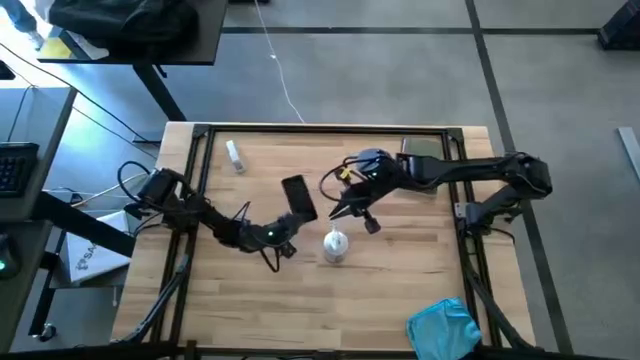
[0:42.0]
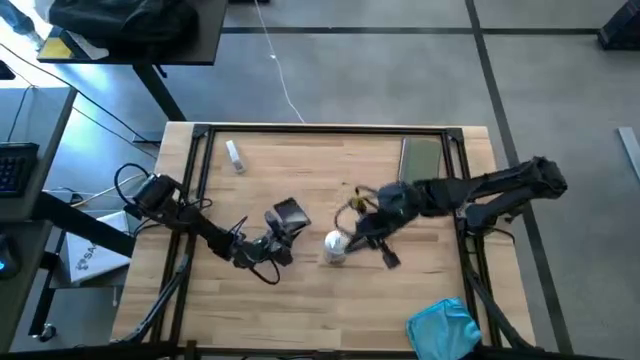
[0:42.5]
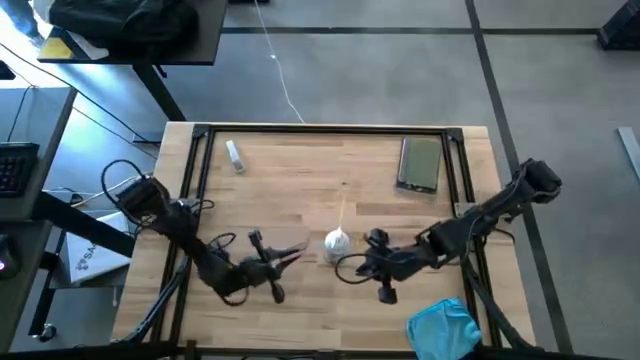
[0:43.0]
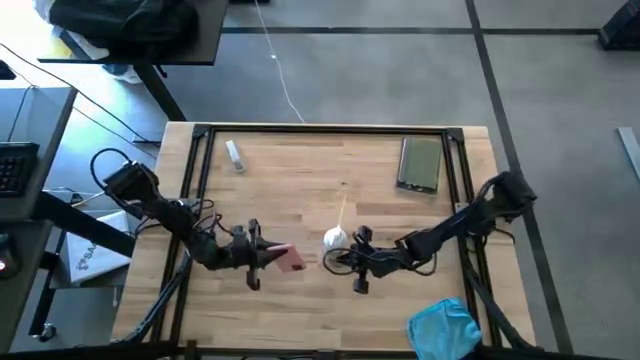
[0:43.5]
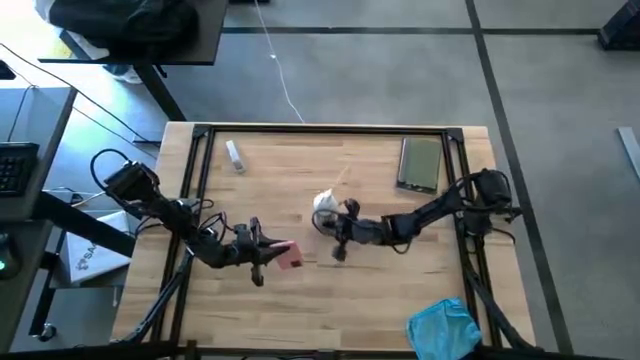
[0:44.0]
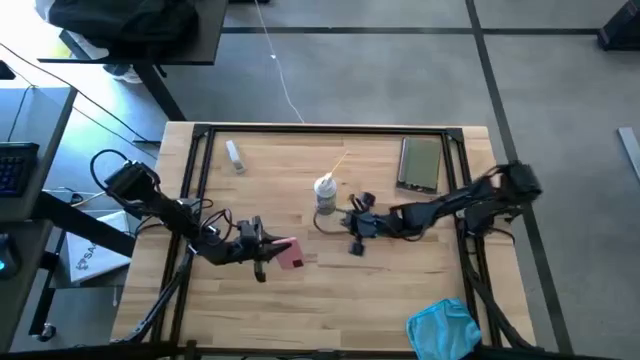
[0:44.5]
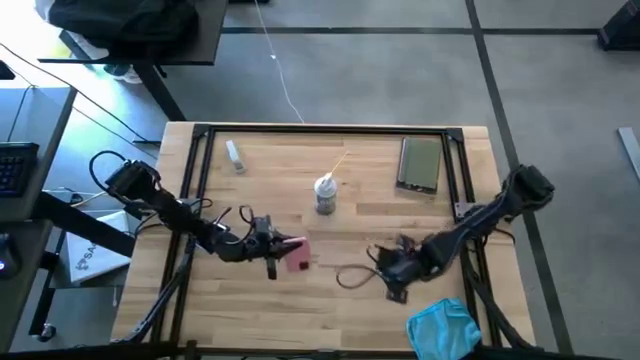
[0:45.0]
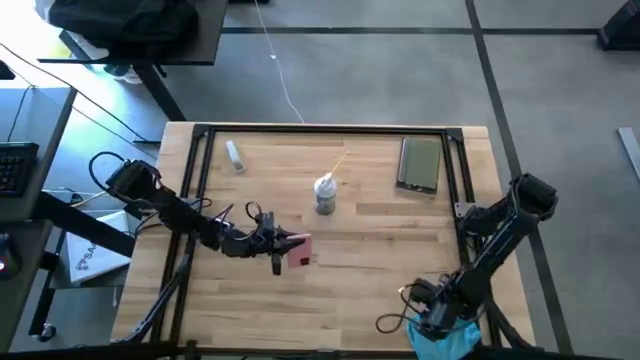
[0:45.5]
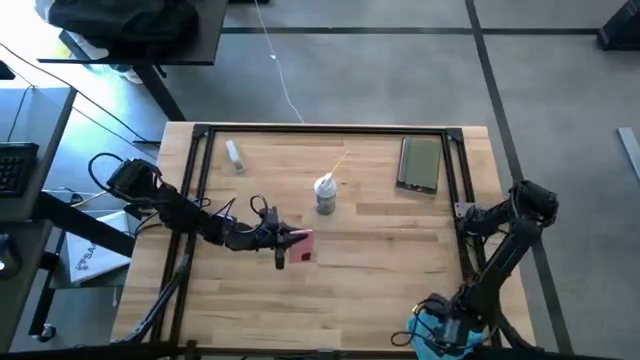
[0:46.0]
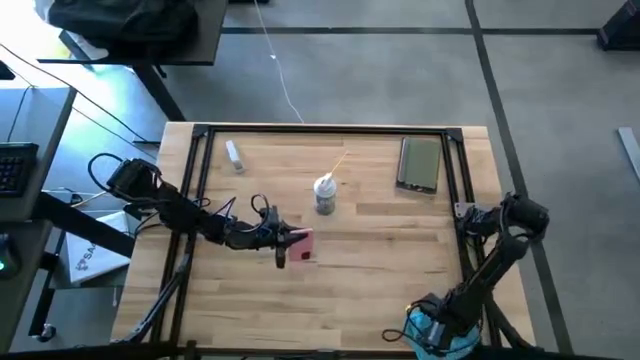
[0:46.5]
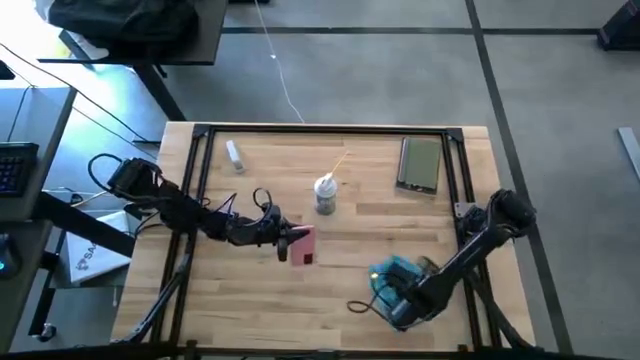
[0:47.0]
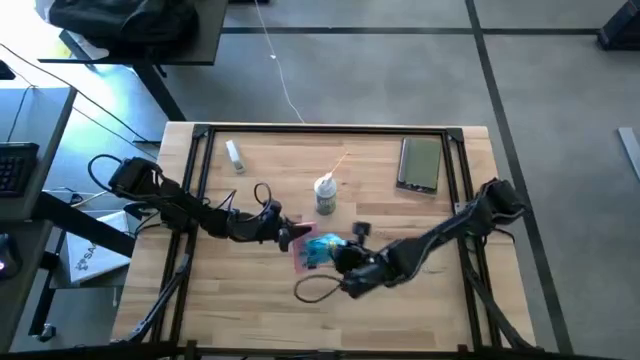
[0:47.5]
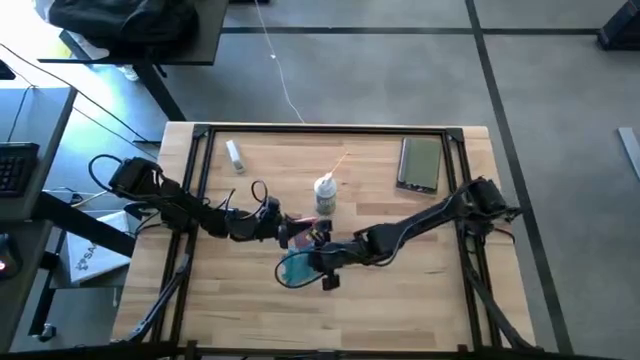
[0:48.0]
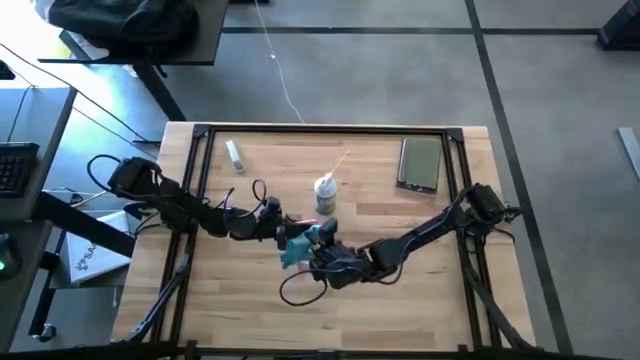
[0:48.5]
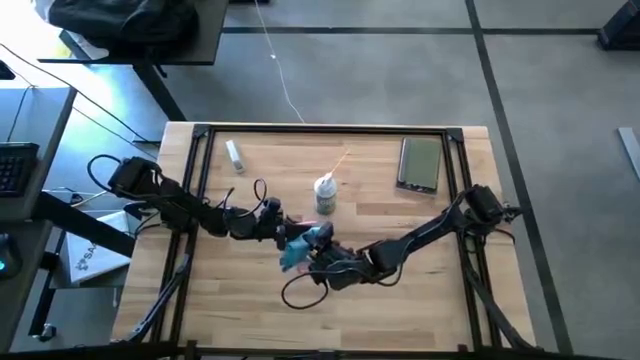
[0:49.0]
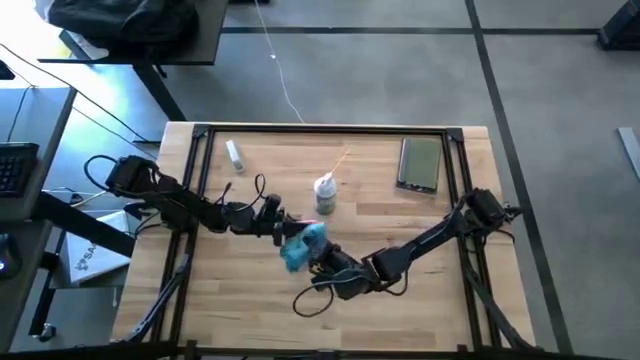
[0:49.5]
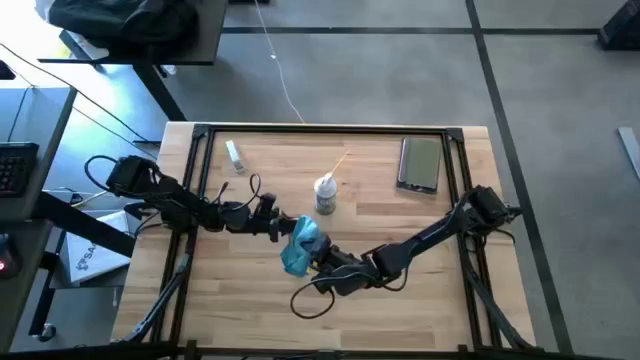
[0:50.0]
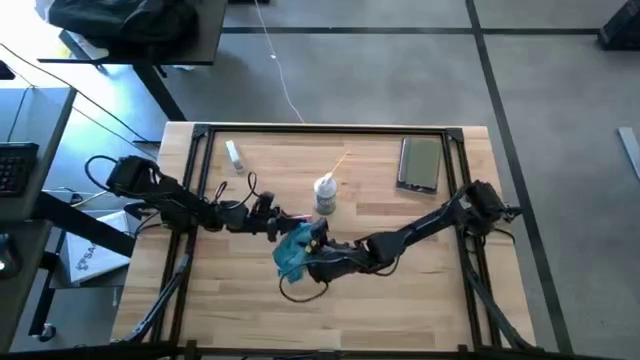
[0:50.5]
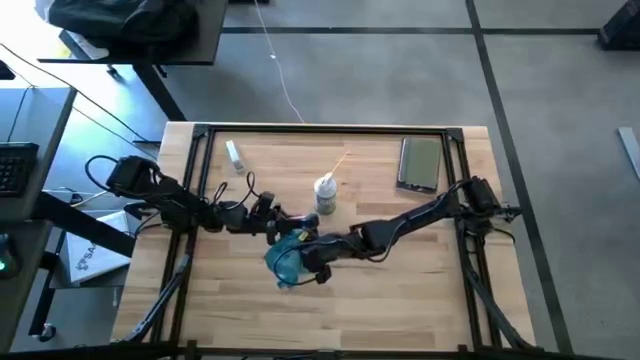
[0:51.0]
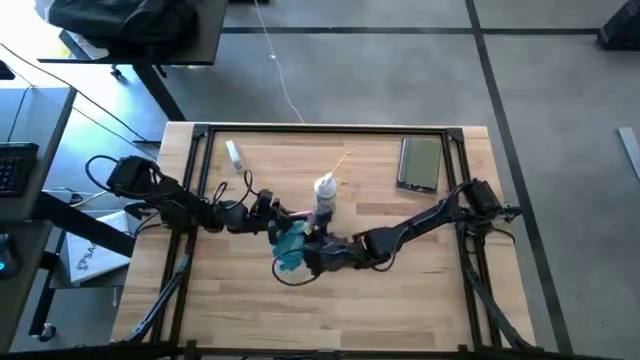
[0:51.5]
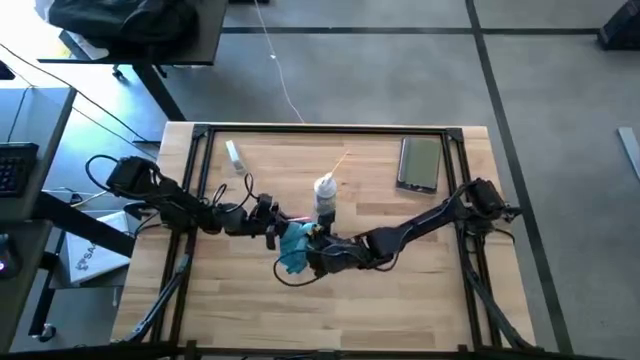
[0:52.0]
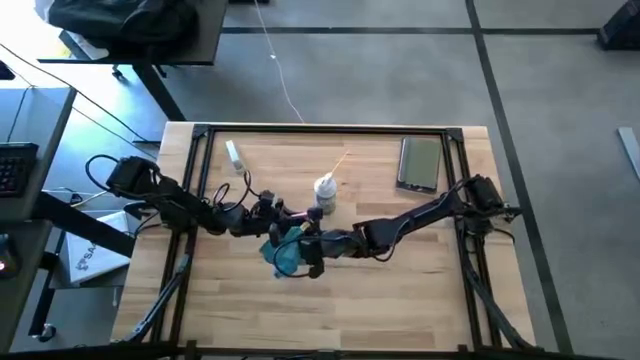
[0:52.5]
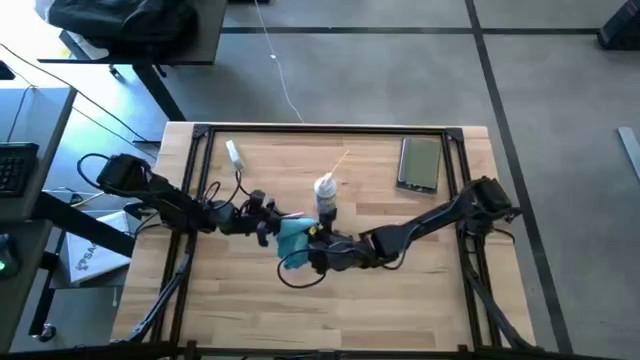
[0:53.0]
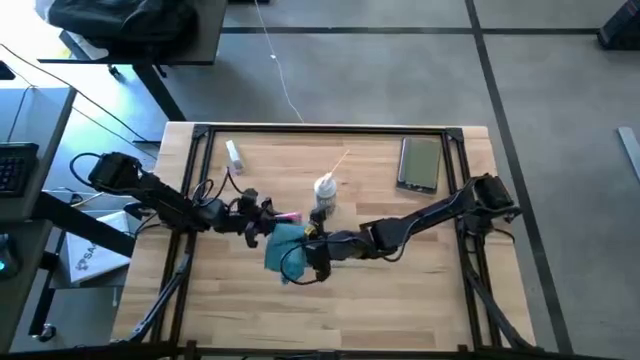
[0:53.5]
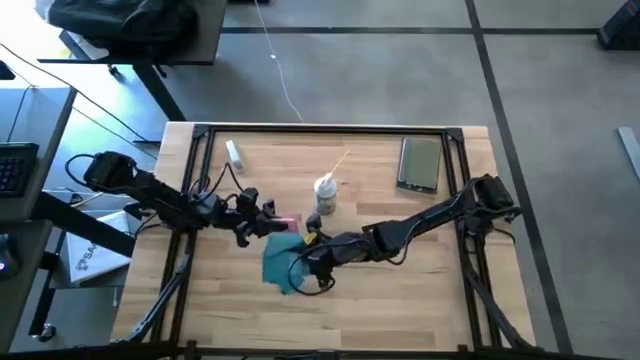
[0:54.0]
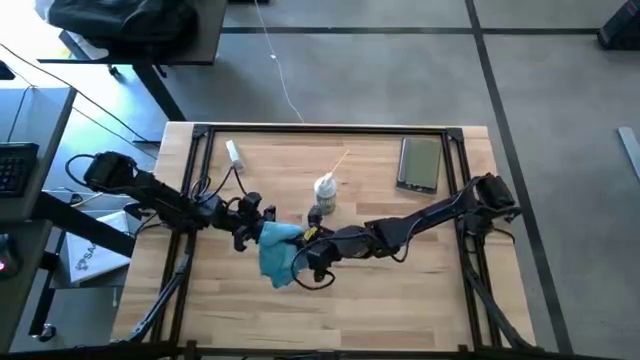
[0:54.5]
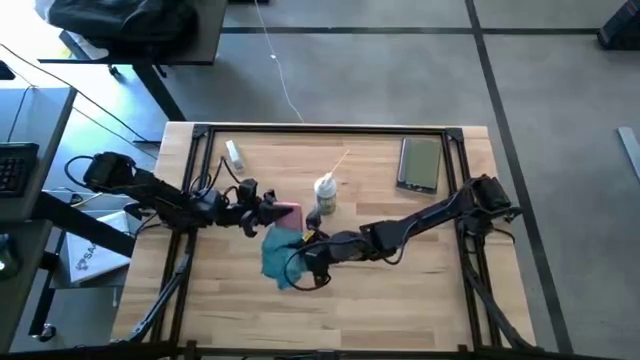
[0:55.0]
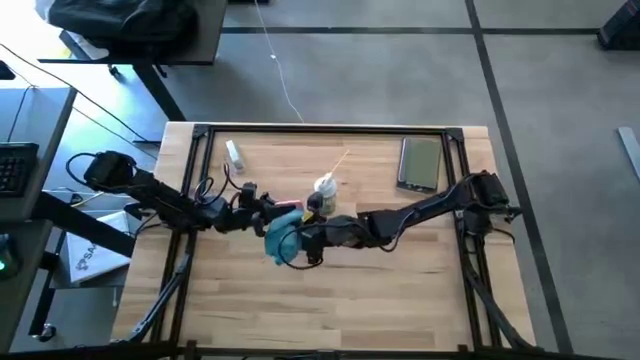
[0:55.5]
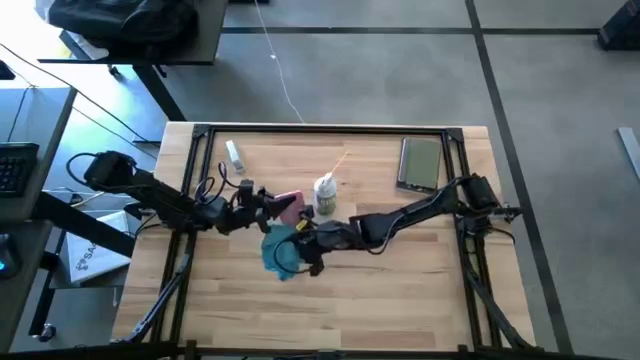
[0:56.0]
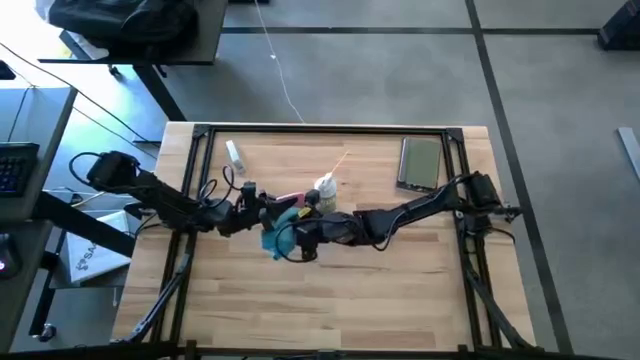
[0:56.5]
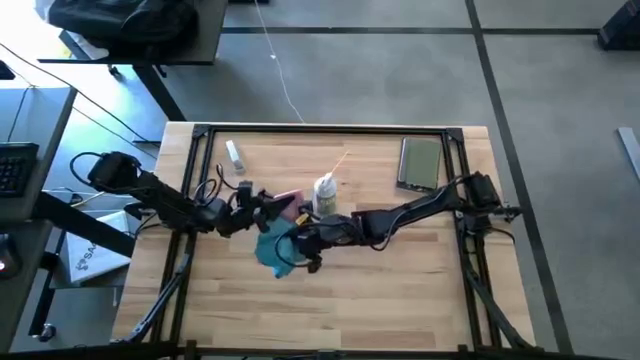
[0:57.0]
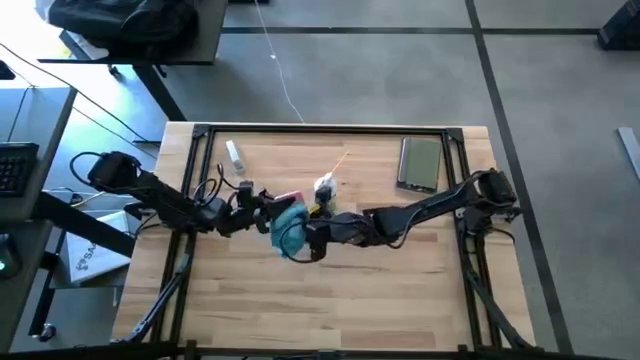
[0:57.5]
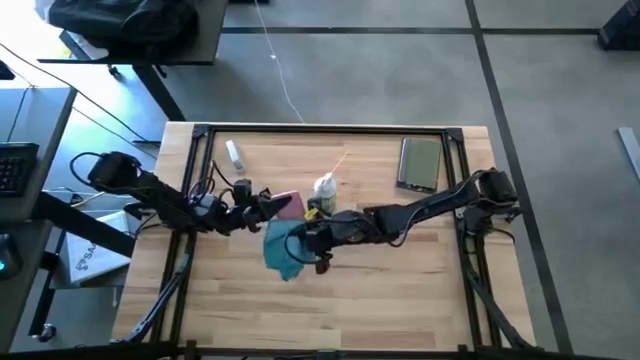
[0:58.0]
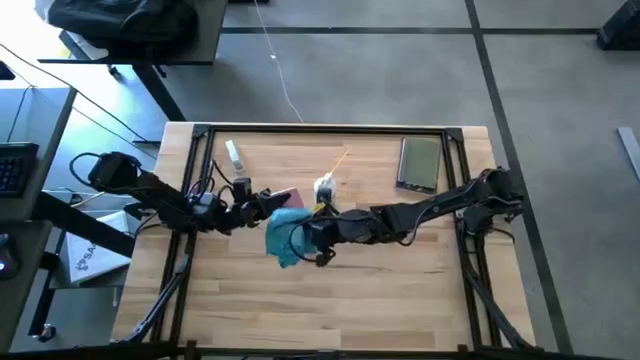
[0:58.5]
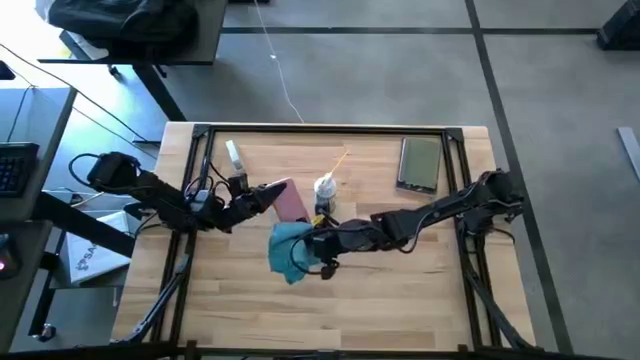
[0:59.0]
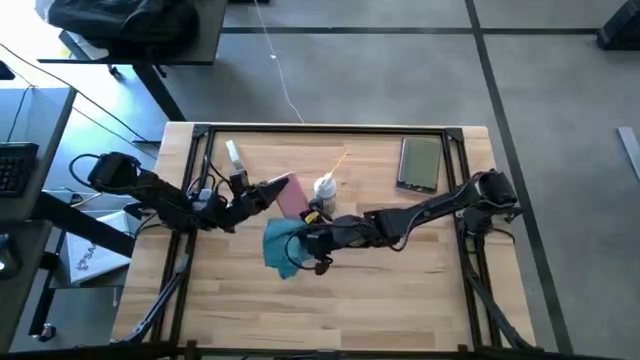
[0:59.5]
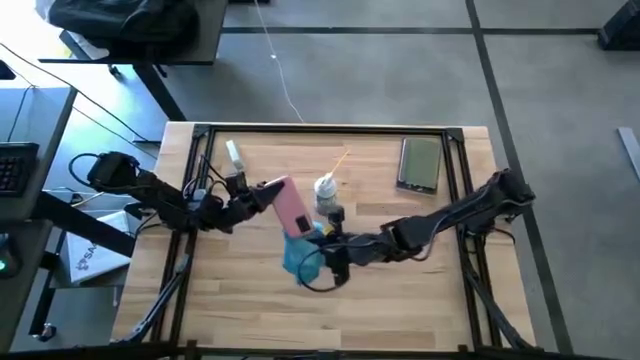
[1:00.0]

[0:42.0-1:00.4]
Task: Apply microfiber cloth
Wipe the back and front of the cellphone with the blue microfiber cloth

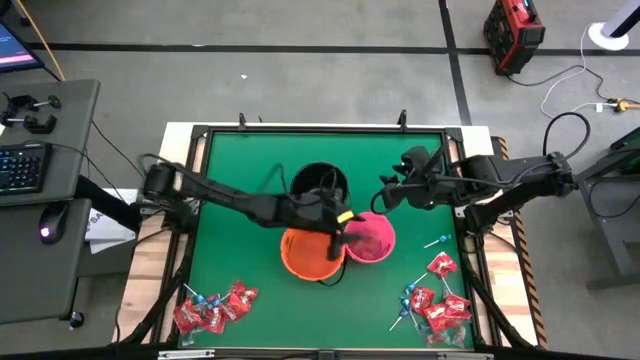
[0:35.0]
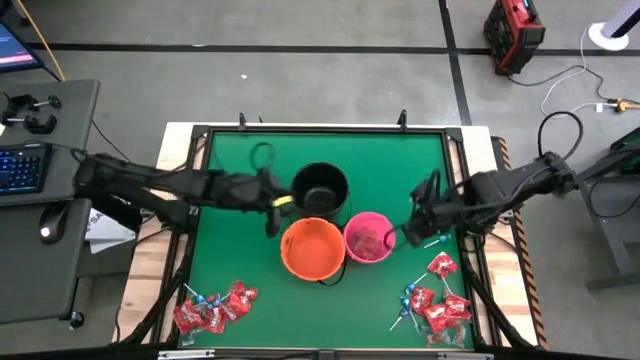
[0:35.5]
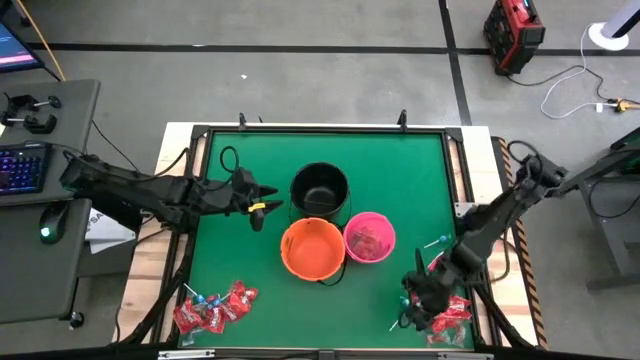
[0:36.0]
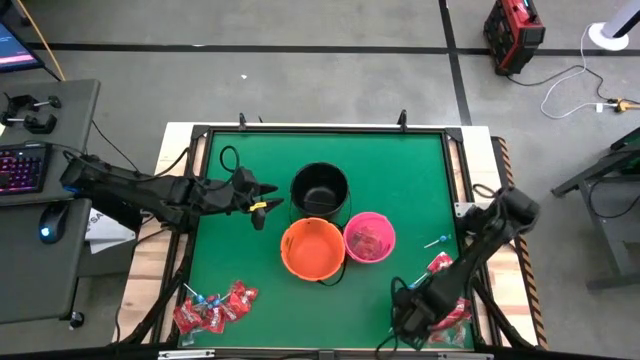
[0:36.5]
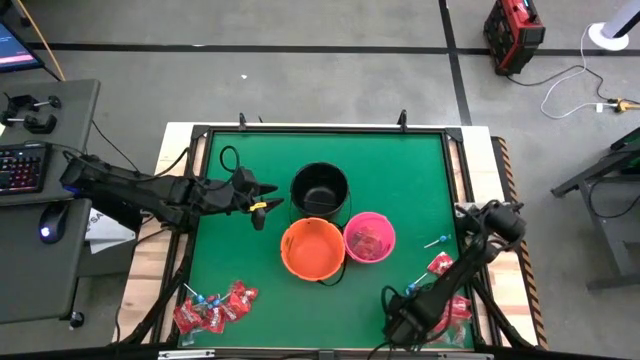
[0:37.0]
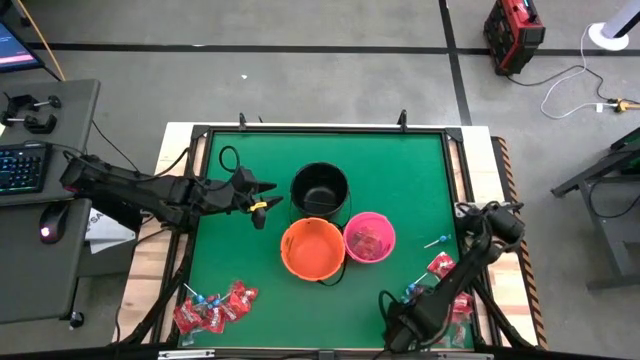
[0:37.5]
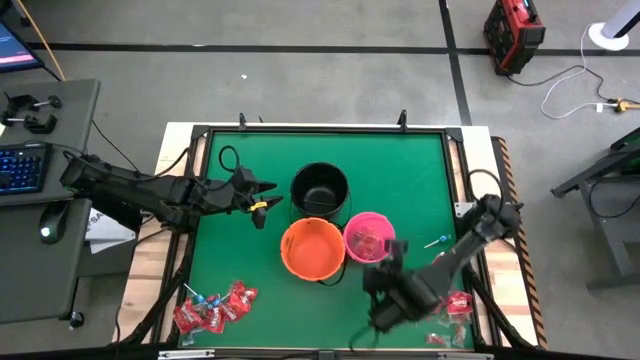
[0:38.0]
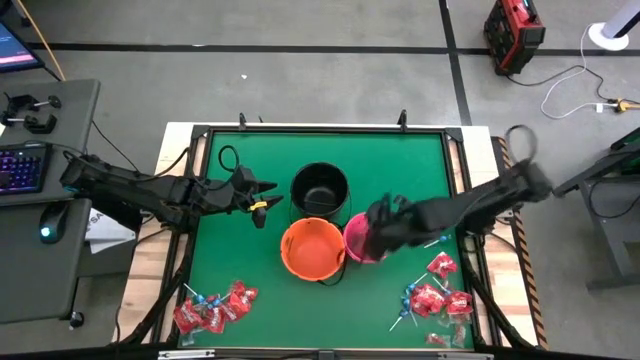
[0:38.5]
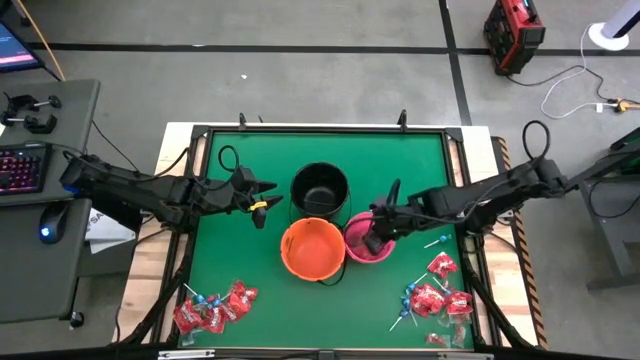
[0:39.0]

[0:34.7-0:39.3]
Task: Sort candy by brand, put in halloween buckets
Put the blue gummy into the pink bucket
